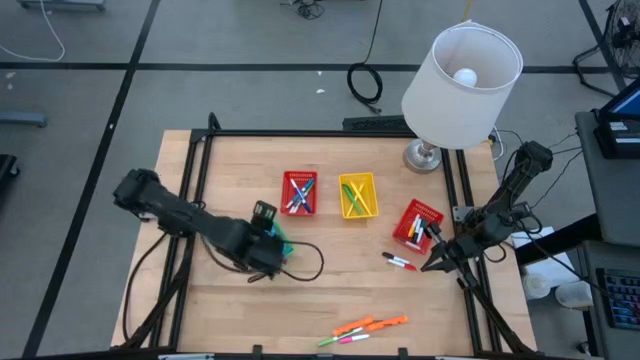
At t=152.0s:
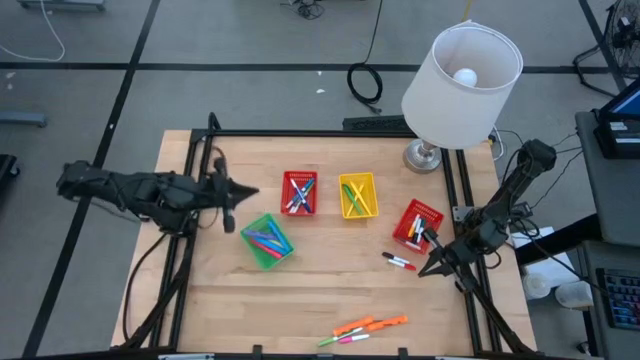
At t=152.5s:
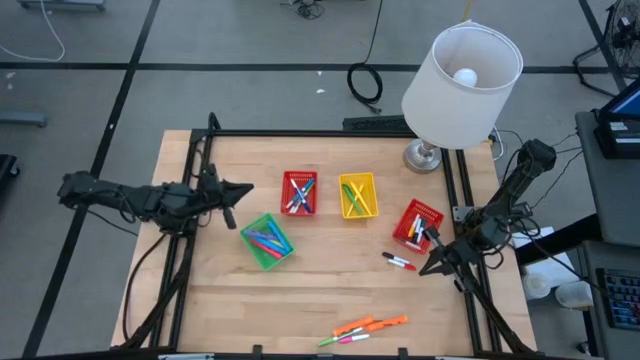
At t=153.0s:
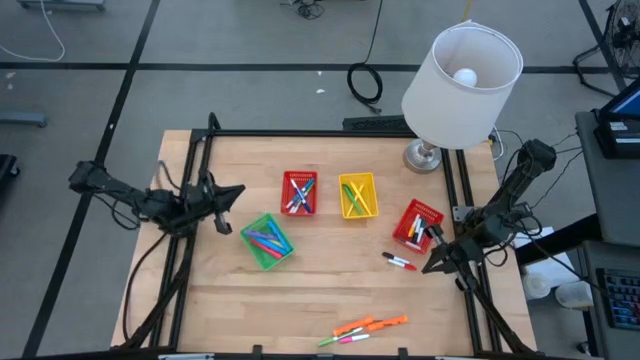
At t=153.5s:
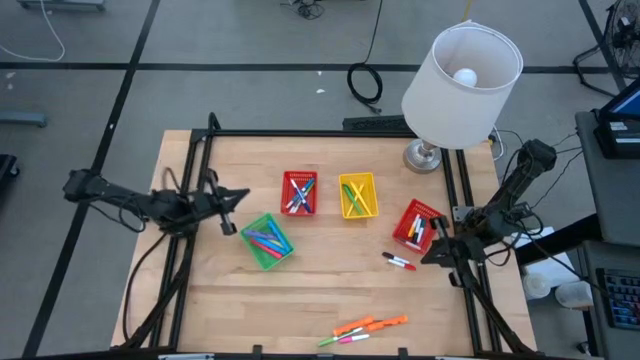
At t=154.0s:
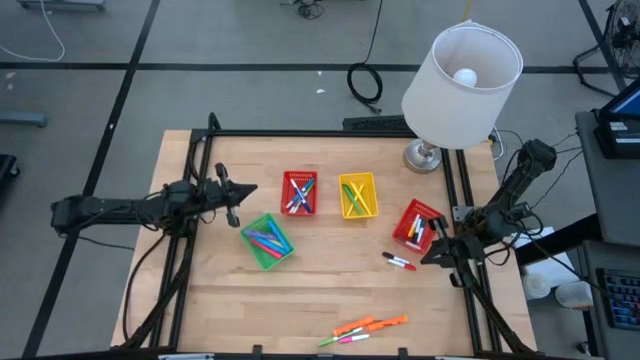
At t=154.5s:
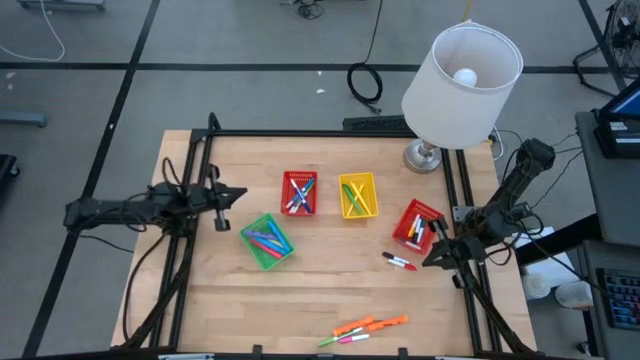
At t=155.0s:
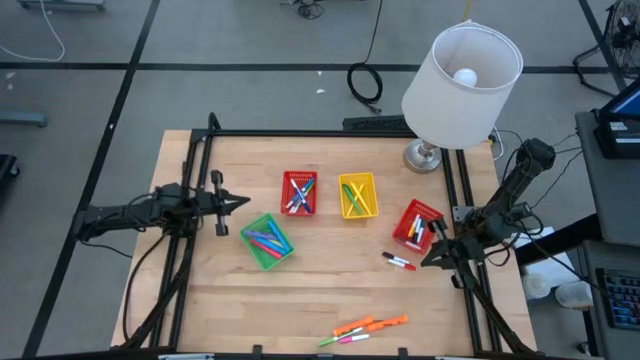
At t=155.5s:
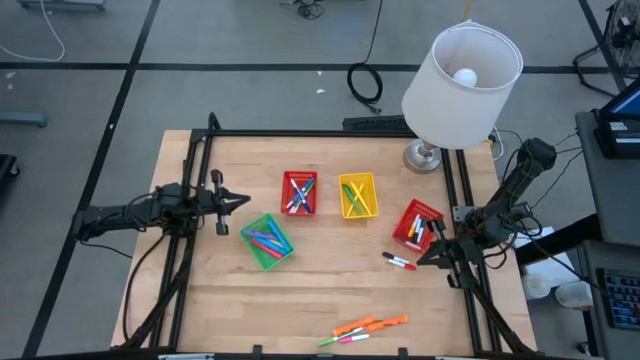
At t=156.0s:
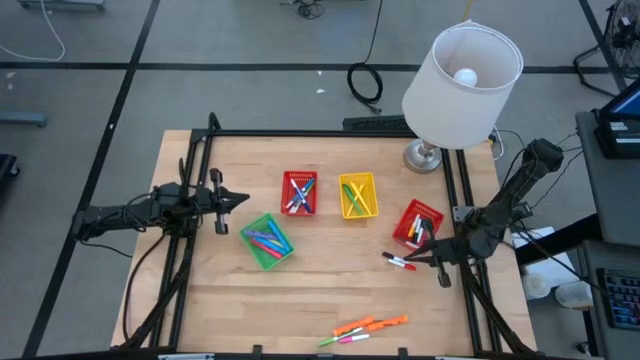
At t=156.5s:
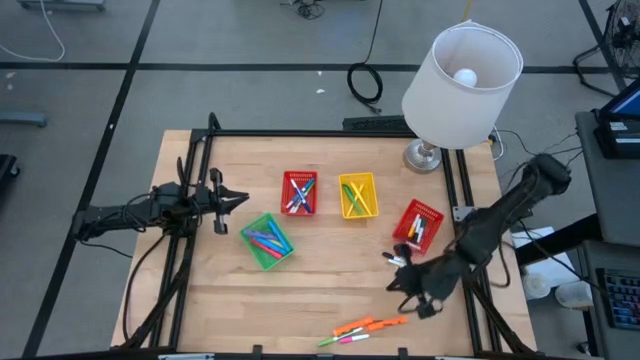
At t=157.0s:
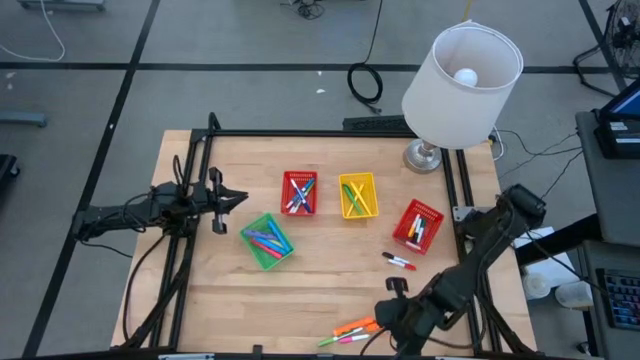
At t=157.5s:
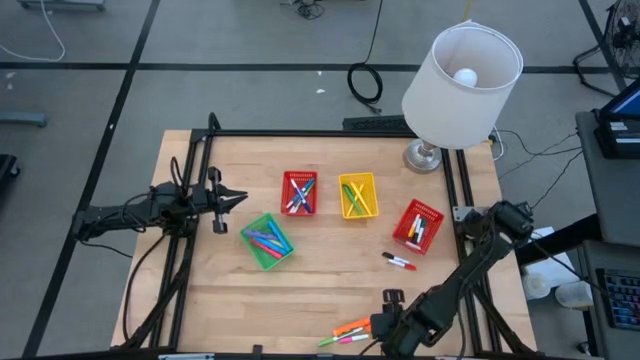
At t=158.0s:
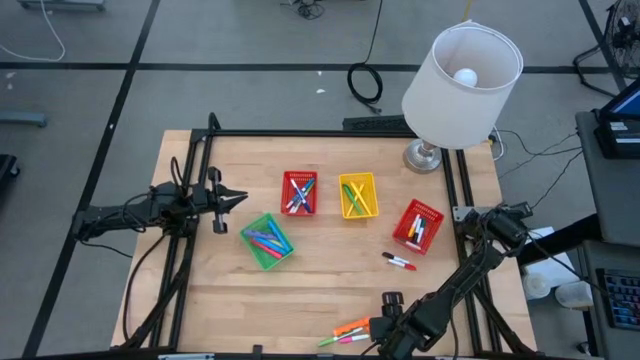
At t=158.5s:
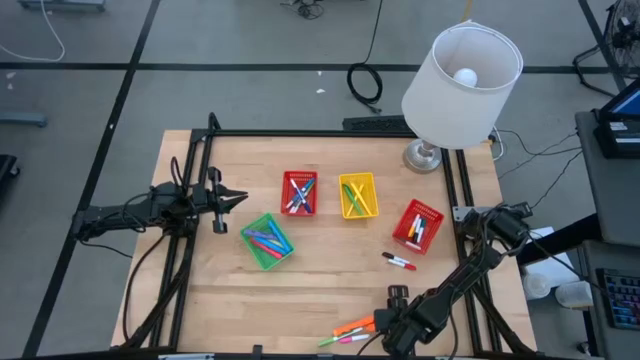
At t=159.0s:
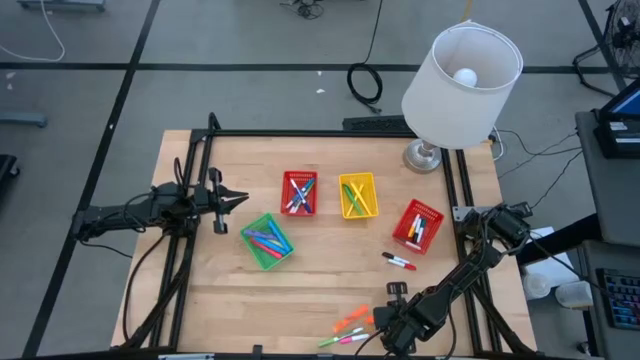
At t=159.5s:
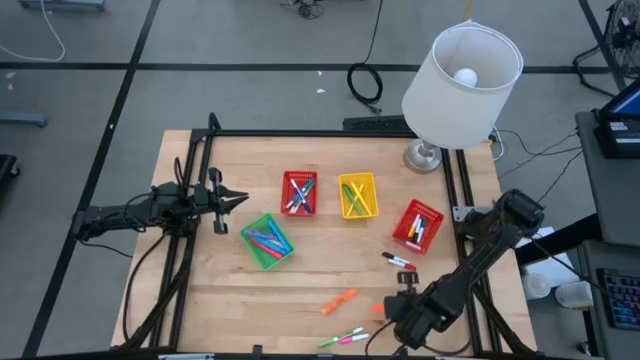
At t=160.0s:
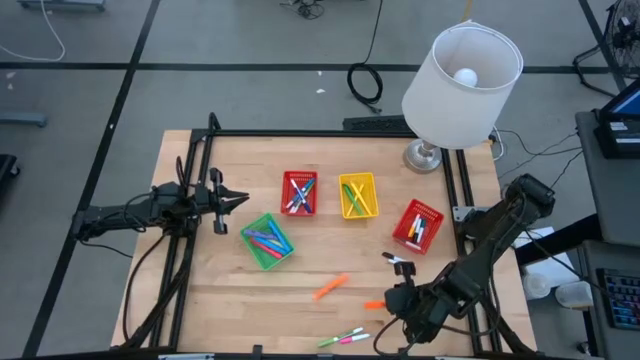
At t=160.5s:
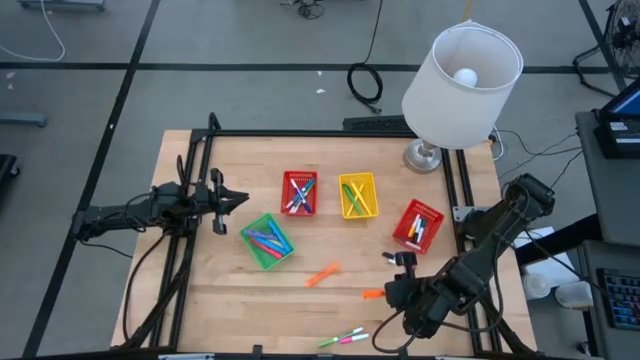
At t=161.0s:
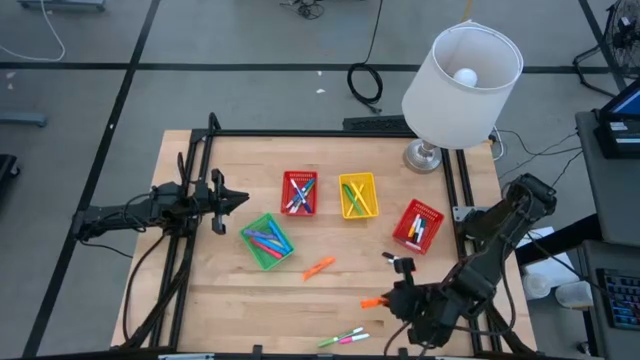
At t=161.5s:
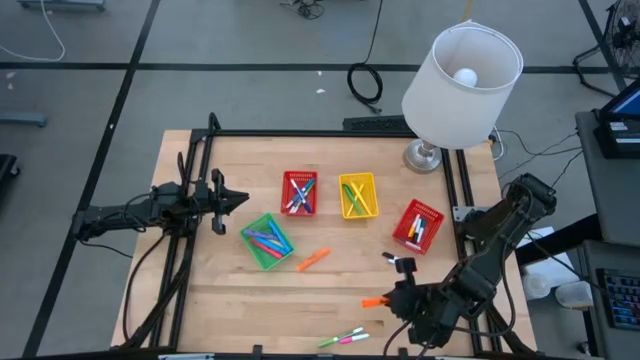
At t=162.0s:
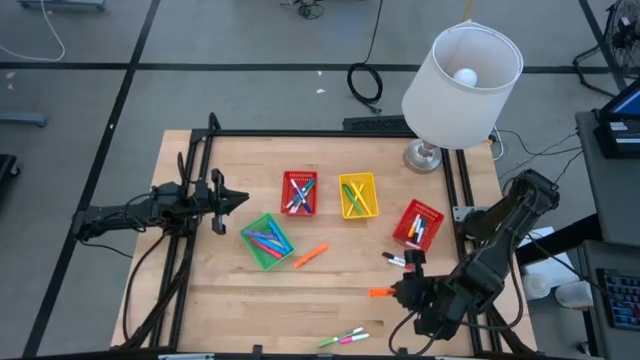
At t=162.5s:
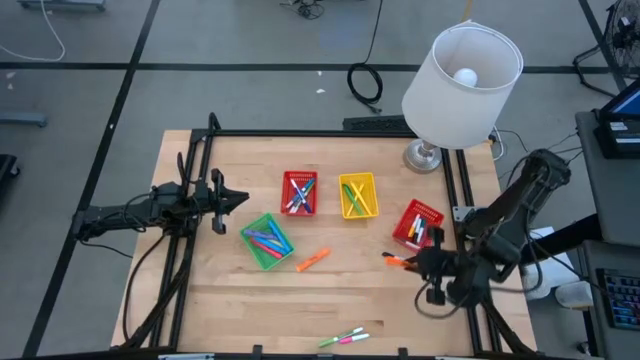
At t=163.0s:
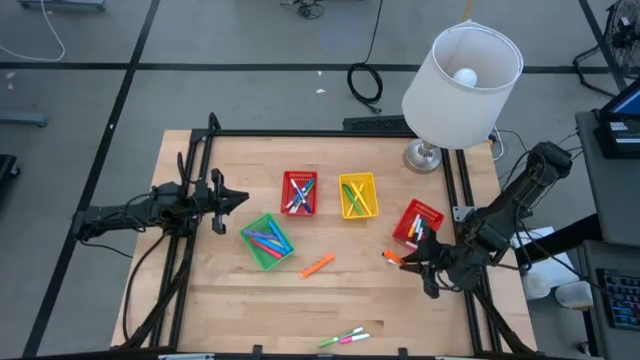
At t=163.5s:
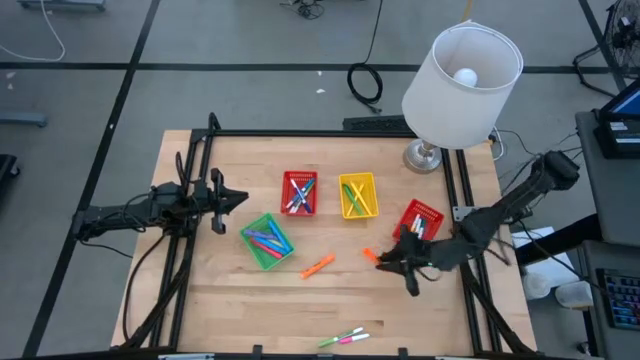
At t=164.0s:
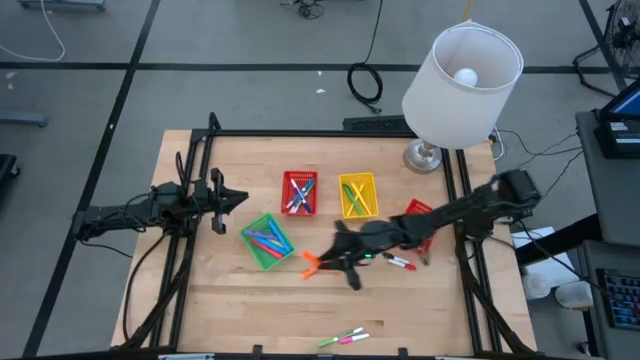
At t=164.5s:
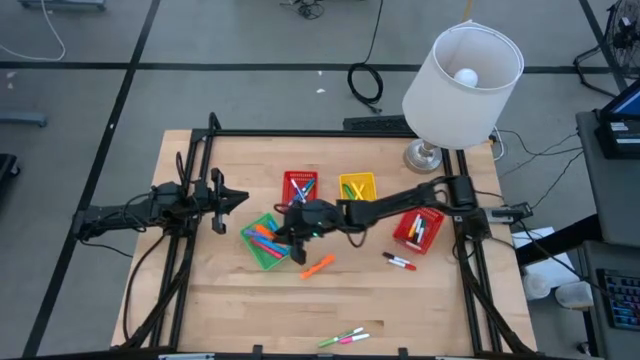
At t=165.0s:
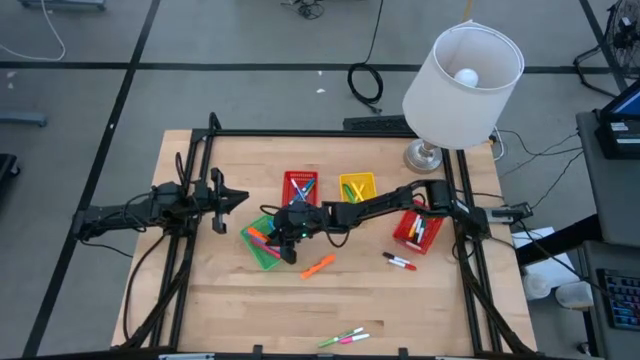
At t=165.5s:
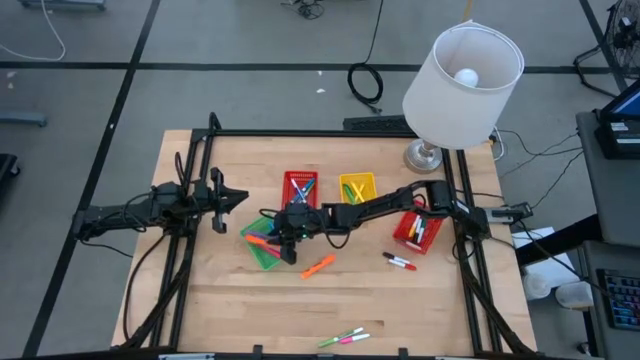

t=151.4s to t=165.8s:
Task: Pick & Place Markers
Put the right orange highlighter into the green bin
